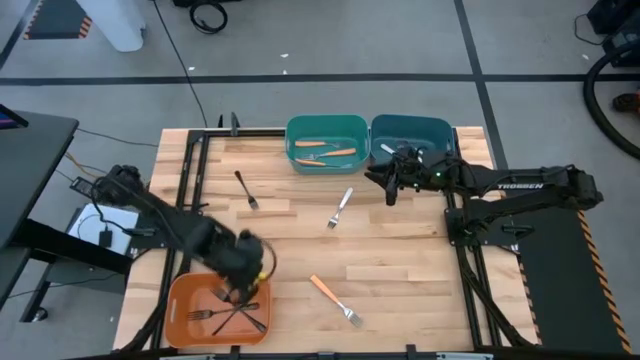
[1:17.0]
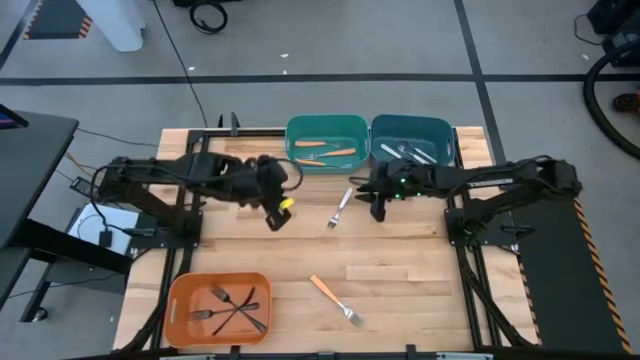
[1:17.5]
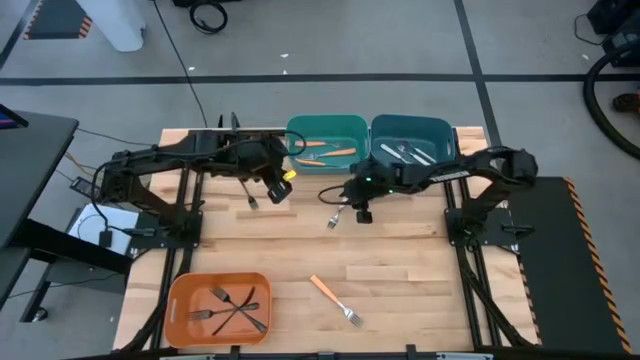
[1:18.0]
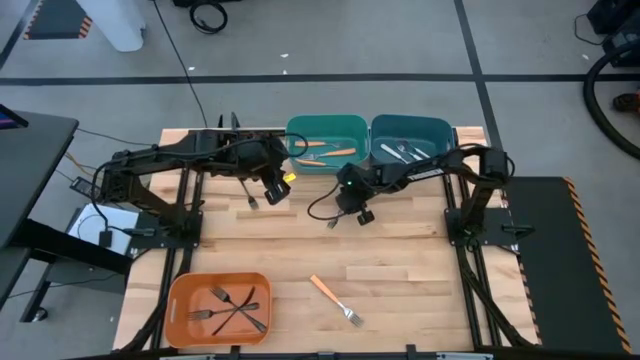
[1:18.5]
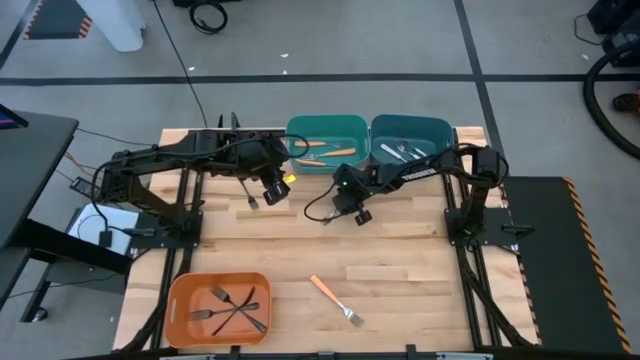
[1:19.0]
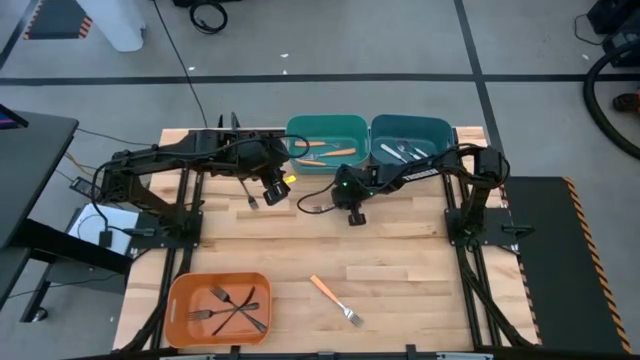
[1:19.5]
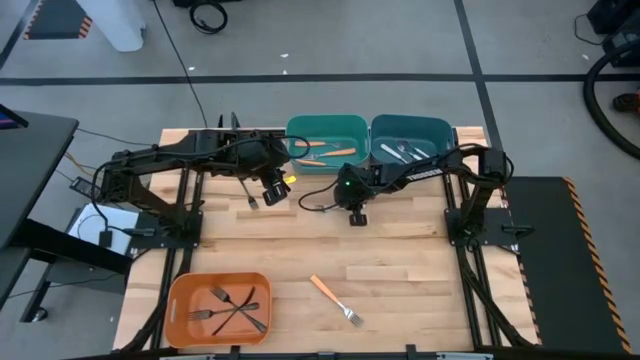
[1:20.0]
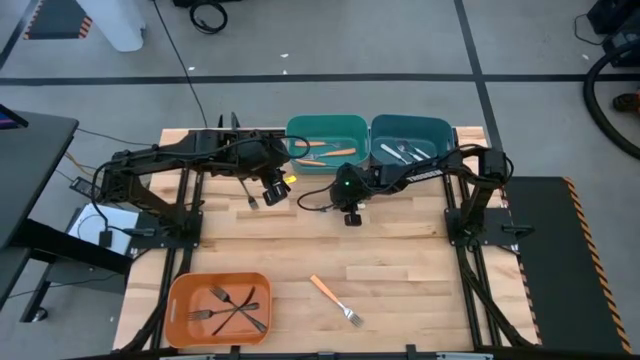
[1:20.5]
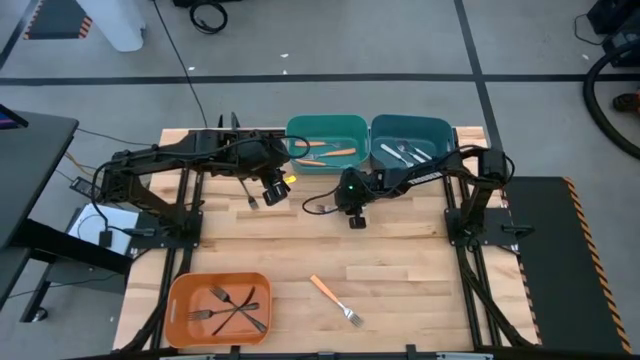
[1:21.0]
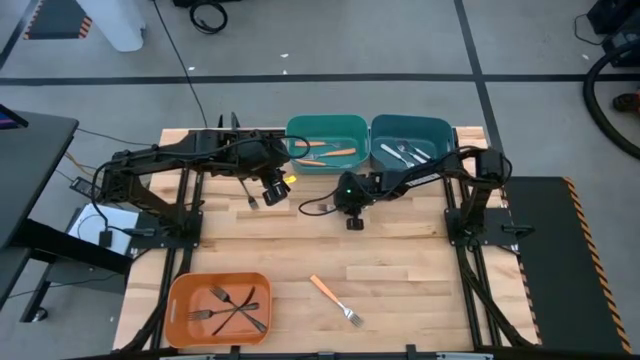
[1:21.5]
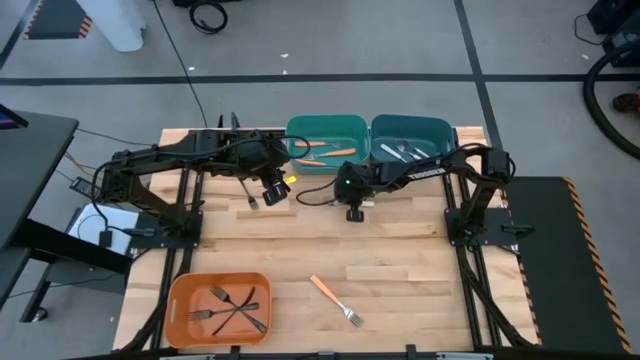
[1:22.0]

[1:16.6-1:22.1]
Task: Sort silverware by color (type)
Put the white fork into the blue bin

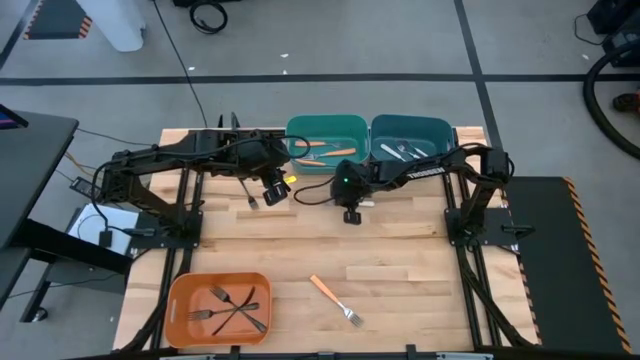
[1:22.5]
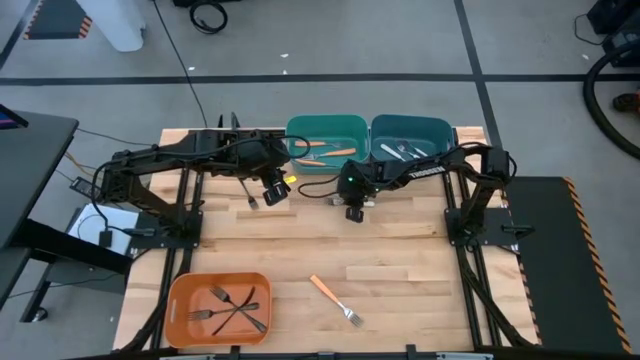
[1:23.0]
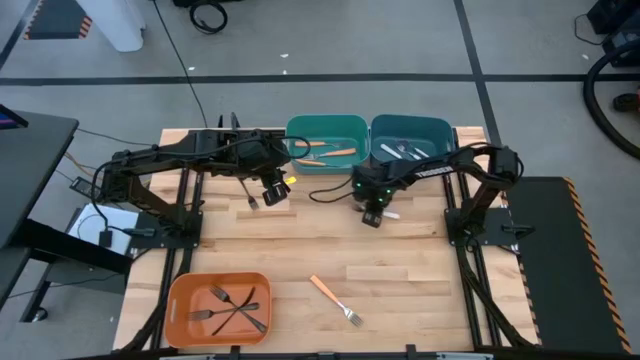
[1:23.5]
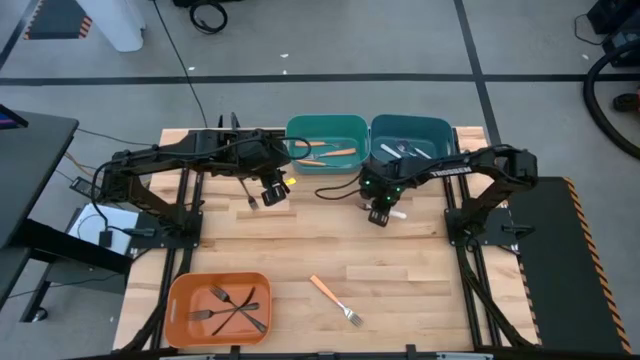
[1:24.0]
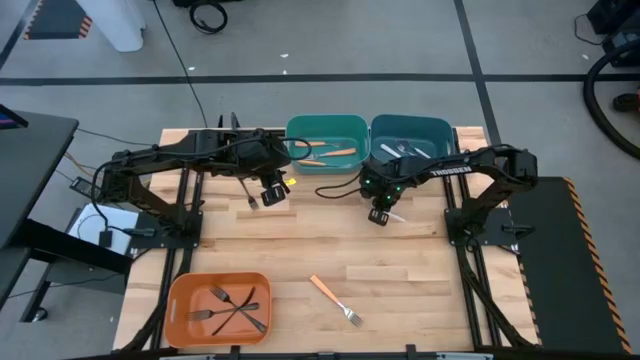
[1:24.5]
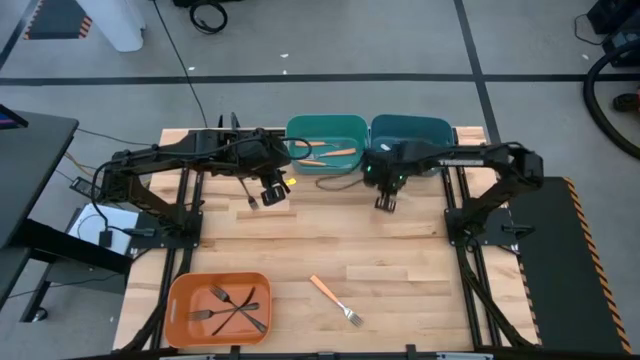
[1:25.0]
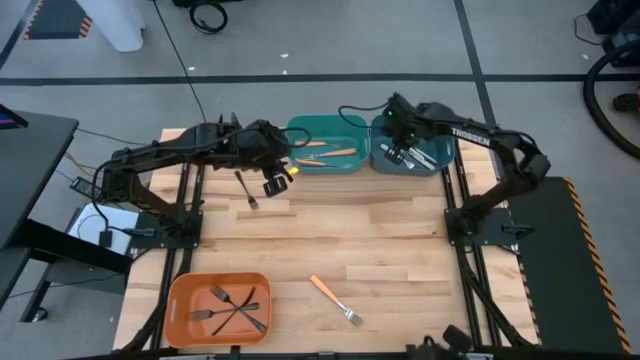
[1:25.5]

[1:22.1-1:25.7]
Put the white fork into the blue bin

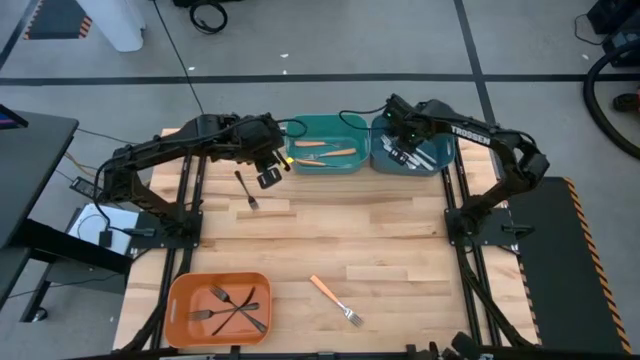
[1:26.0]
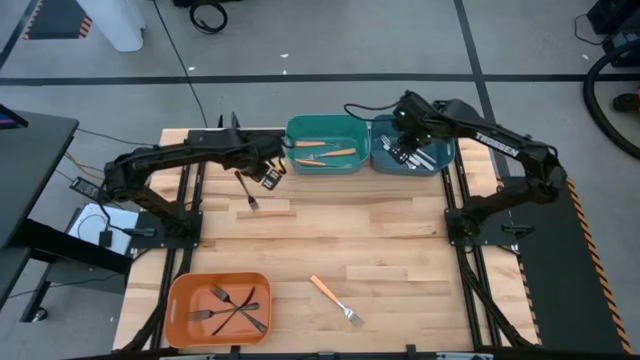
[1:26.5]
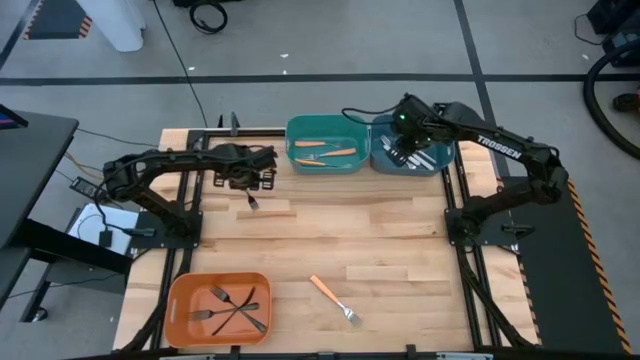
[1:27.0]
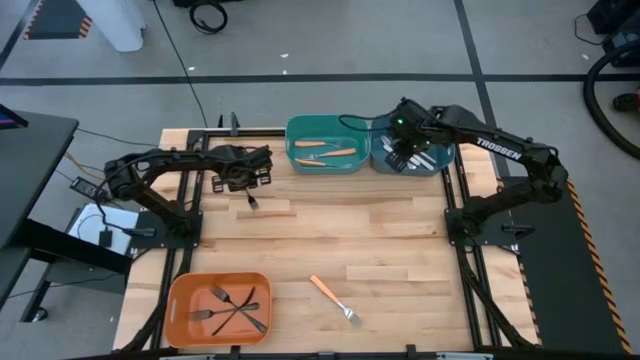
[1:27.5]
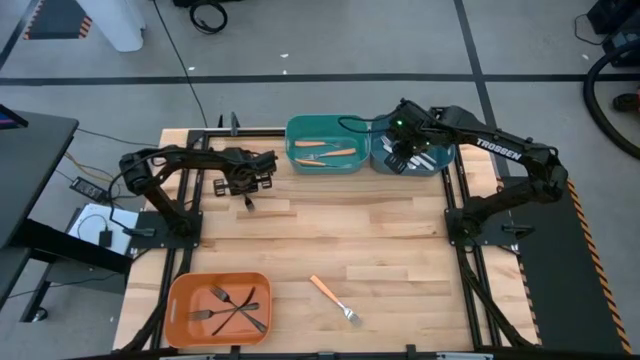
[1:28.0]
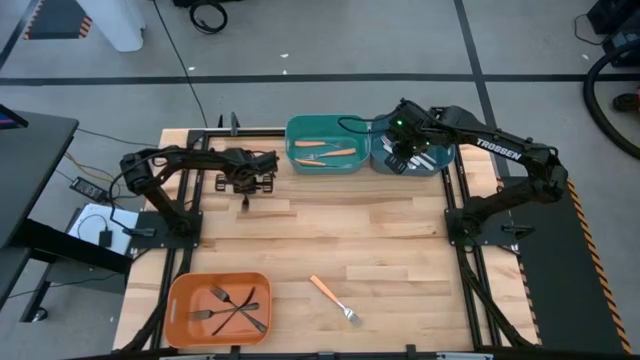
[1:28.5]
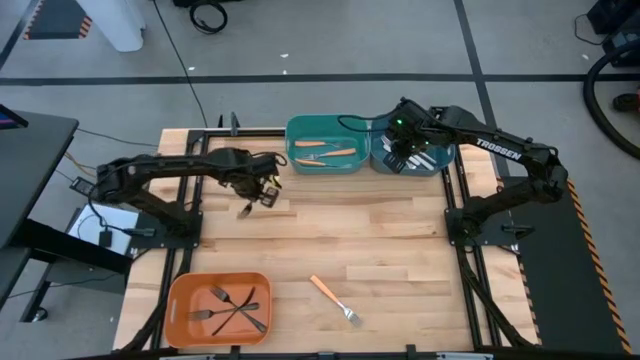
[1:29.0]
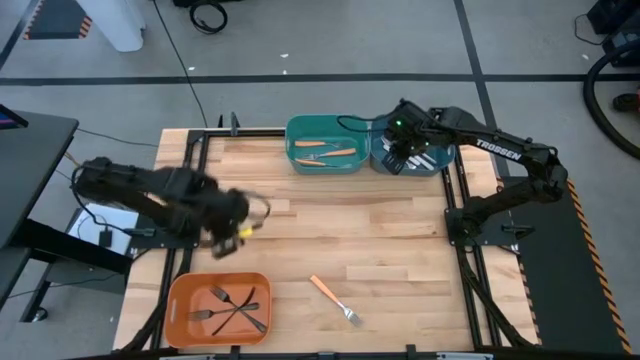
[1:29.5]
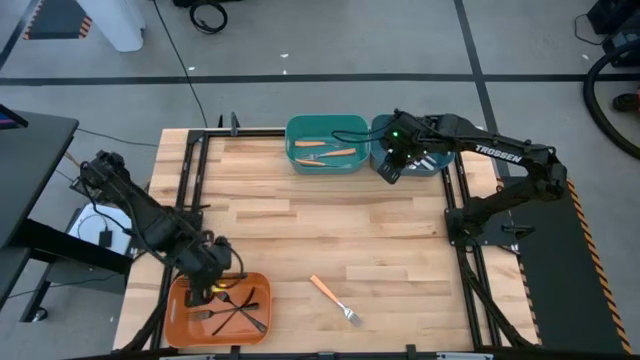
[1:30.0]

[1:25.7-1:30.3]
Put the black fork into the orange bin

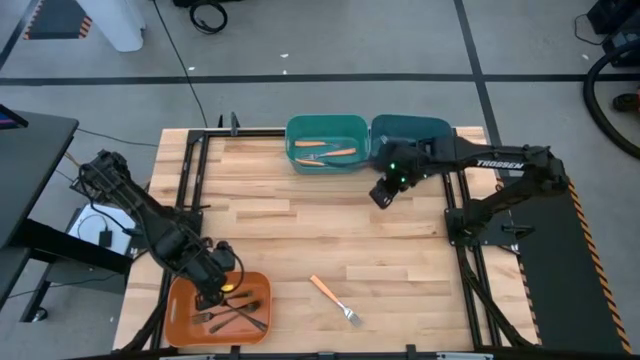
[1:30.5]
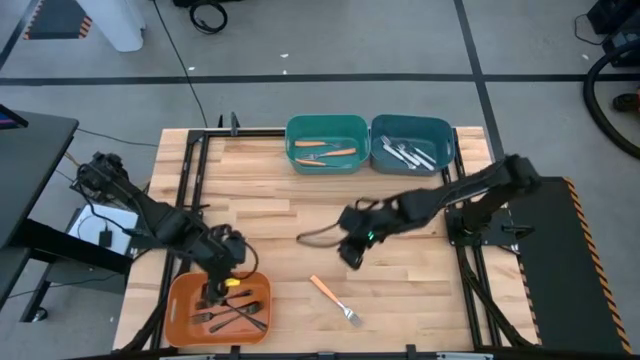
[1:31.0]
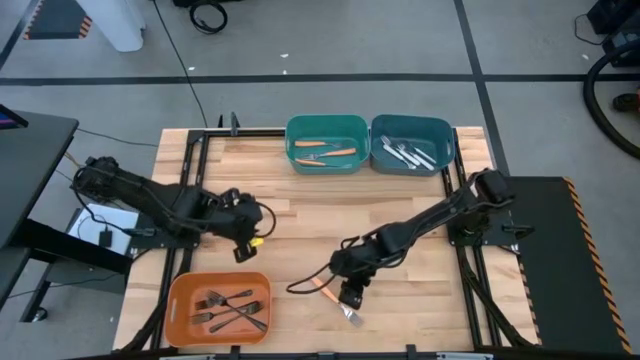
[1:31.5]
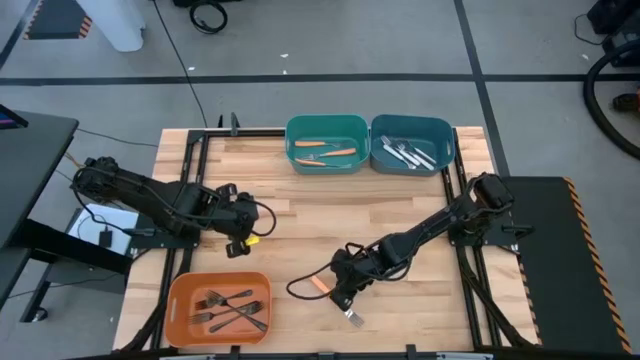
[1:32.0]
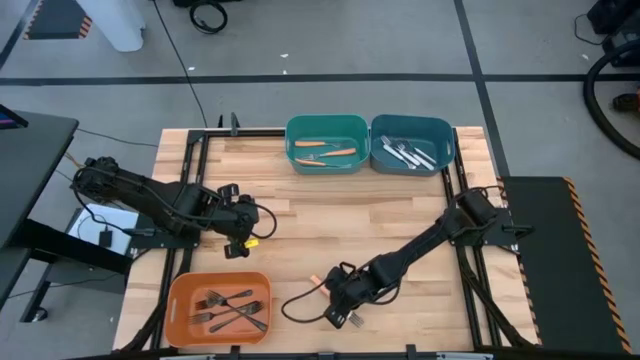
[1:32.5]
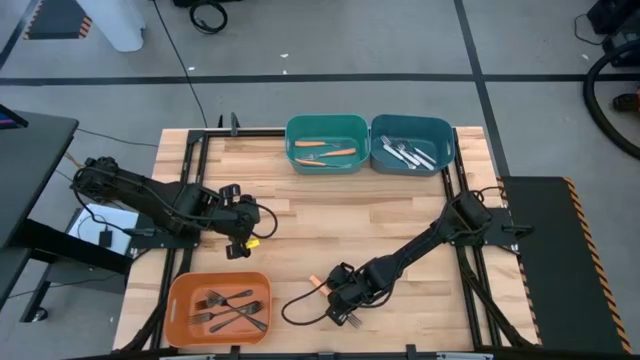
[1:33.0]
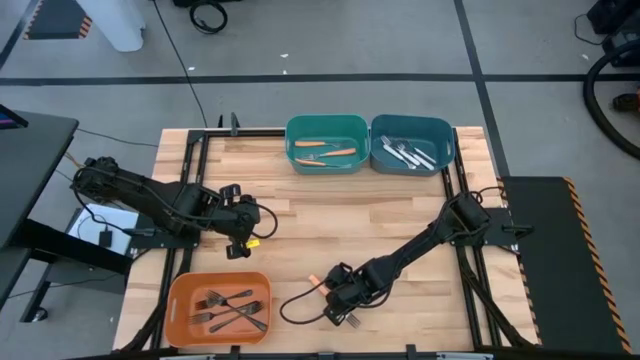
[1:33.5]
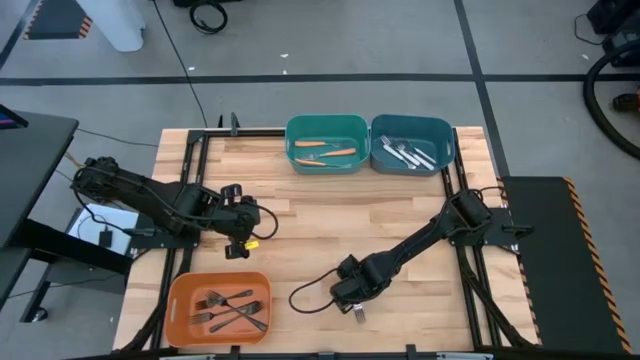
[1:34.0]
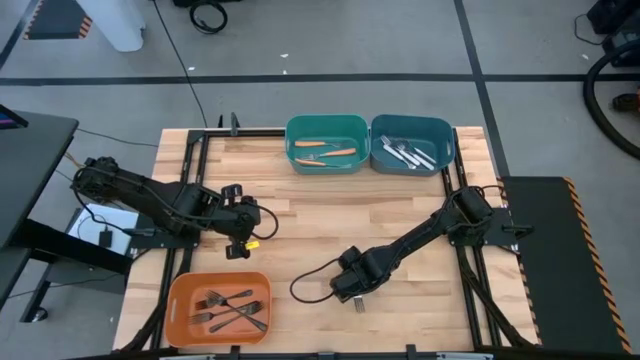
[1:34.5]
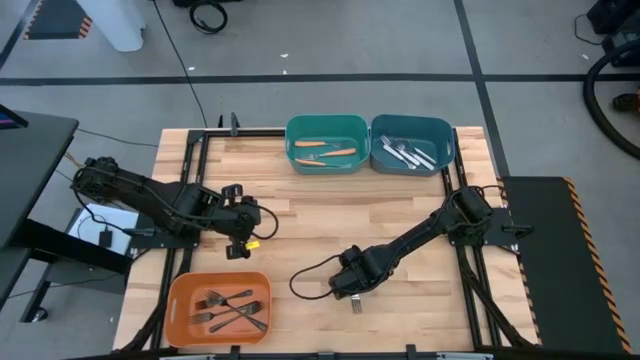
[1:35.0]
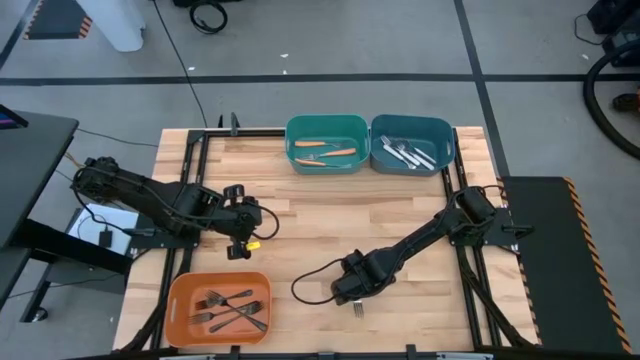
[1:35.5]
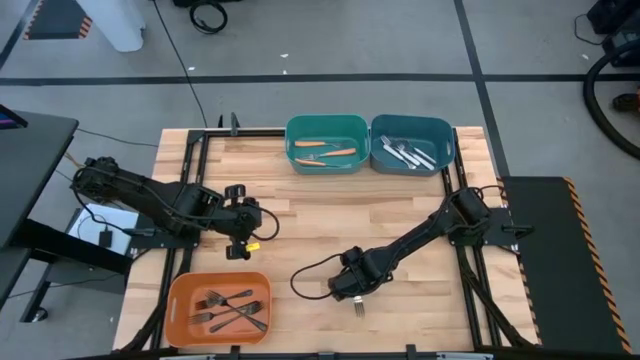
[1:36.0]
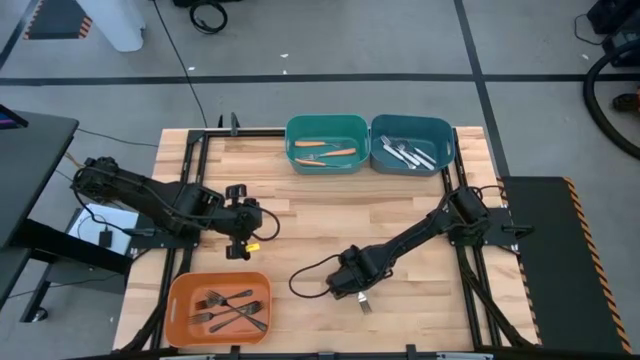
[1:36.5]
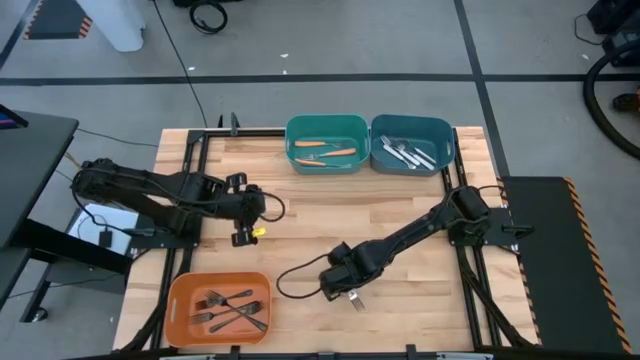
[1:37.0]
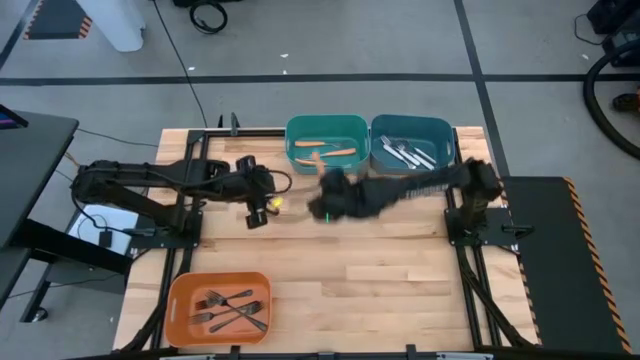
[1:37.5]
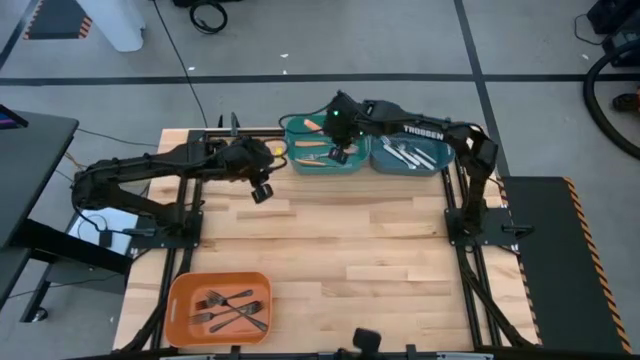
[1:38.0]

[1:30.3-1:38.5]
Put the orange fork into the green bin

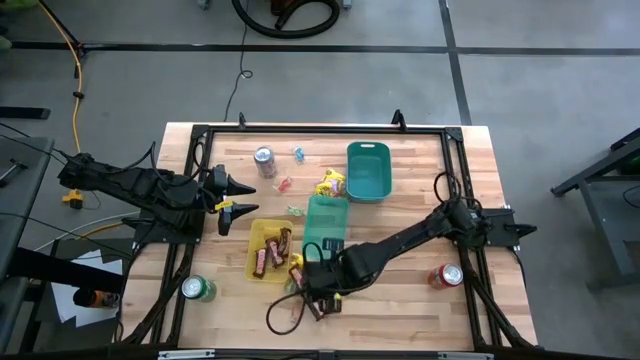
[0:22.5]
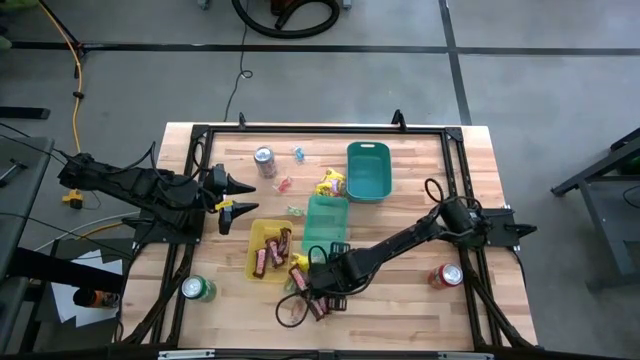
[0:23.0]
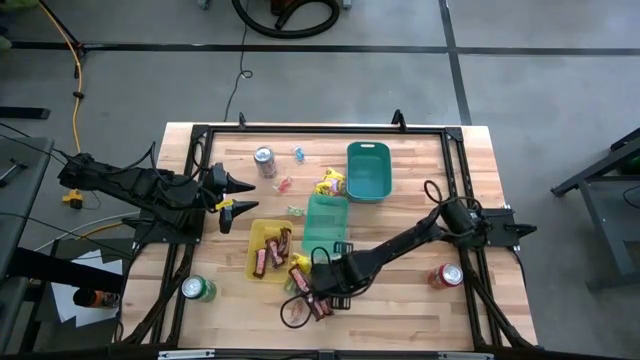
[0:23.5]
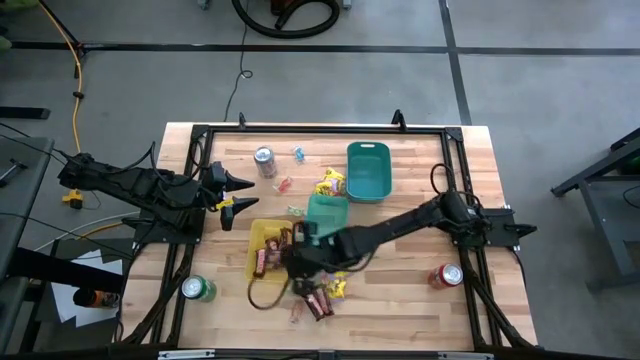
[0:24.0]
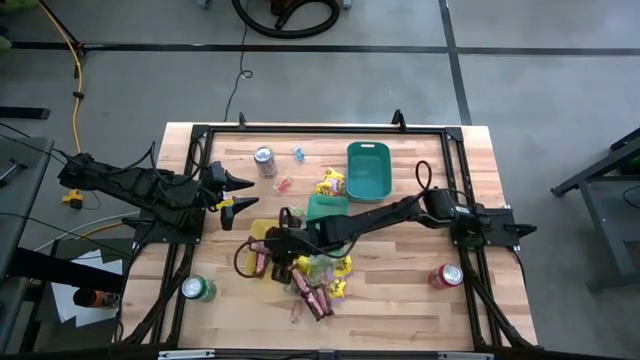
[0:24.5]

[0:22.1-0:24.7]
Task: Sort candy
Put the brown chocolate bar into the yellow bin
